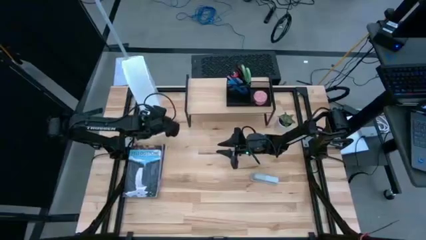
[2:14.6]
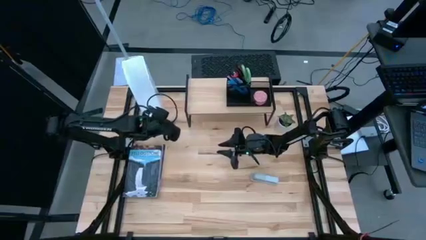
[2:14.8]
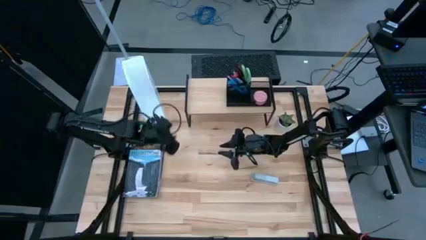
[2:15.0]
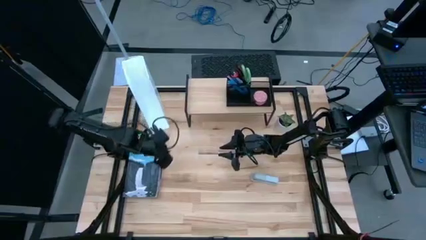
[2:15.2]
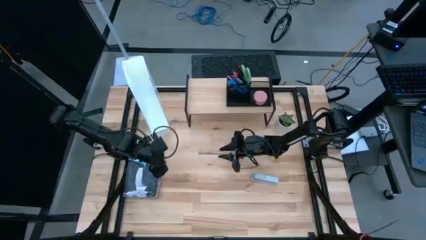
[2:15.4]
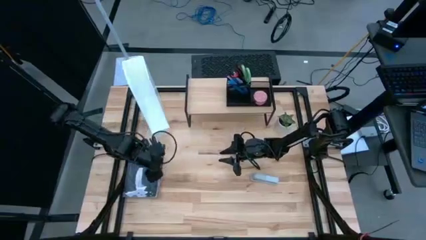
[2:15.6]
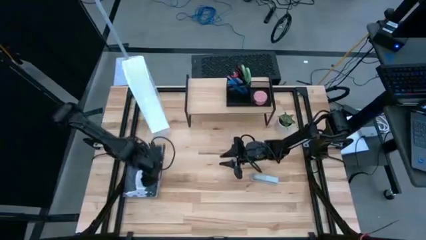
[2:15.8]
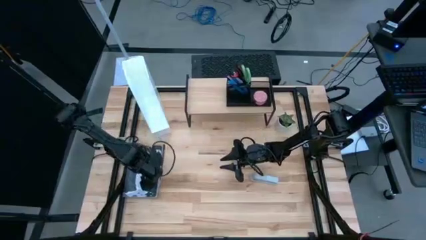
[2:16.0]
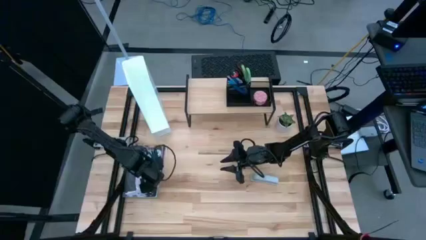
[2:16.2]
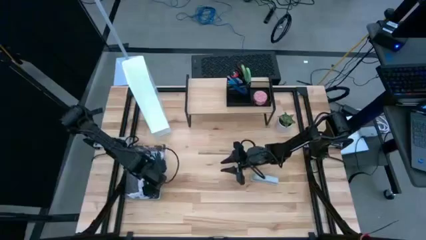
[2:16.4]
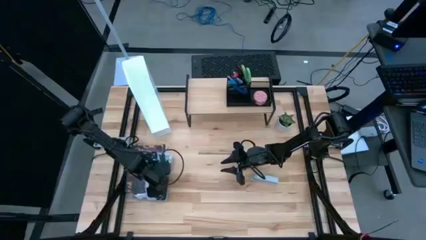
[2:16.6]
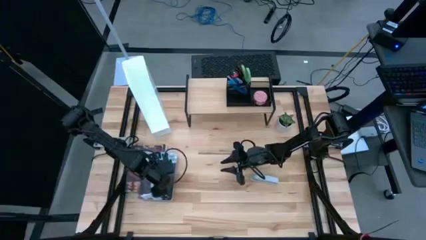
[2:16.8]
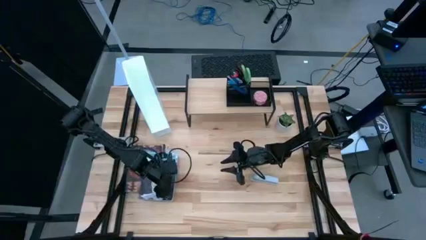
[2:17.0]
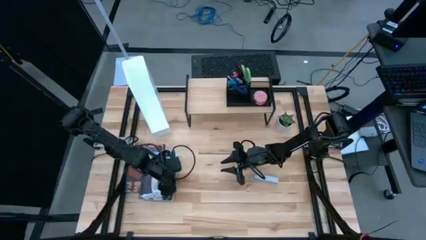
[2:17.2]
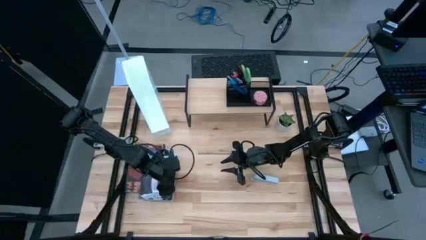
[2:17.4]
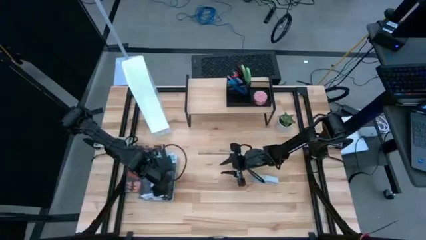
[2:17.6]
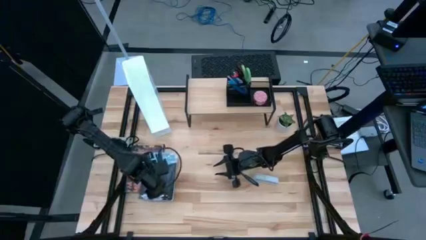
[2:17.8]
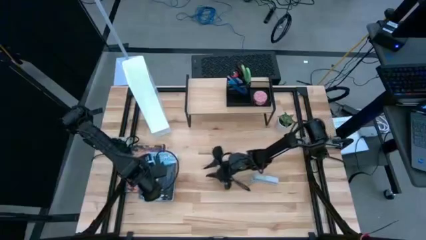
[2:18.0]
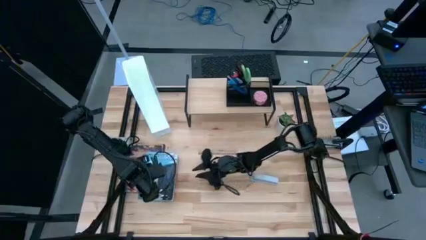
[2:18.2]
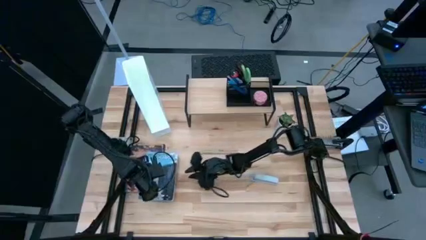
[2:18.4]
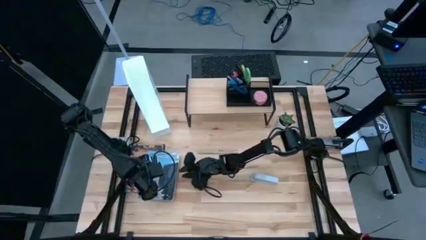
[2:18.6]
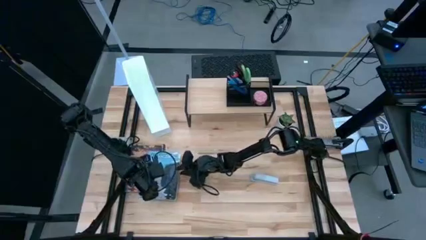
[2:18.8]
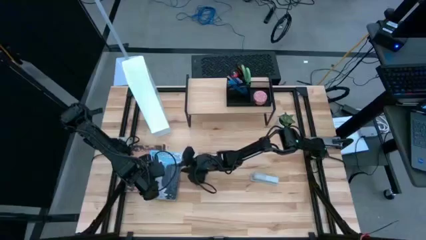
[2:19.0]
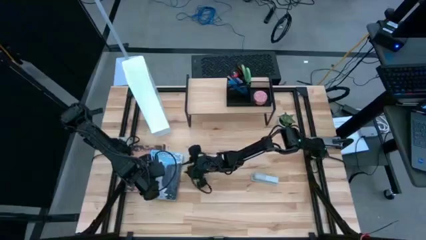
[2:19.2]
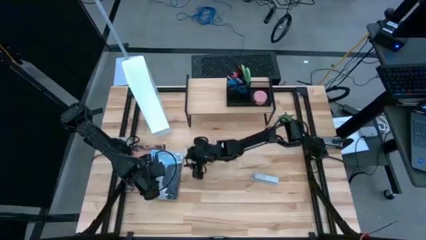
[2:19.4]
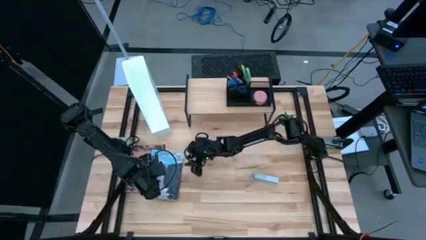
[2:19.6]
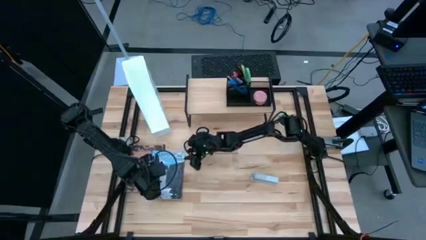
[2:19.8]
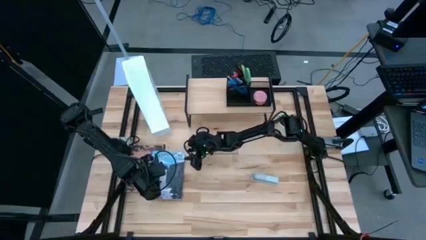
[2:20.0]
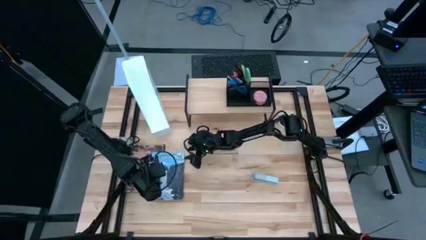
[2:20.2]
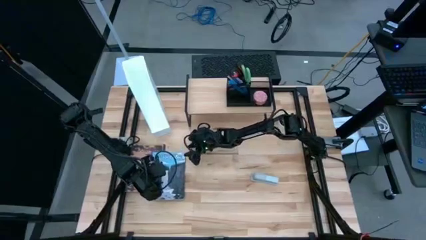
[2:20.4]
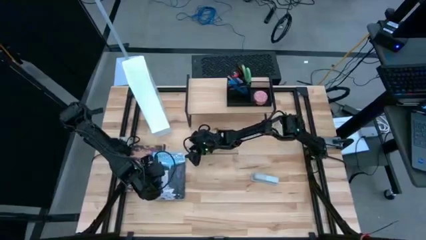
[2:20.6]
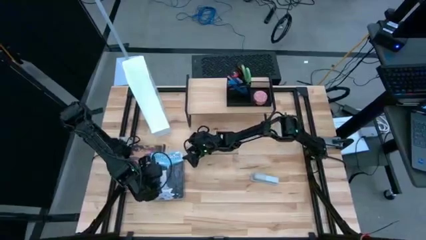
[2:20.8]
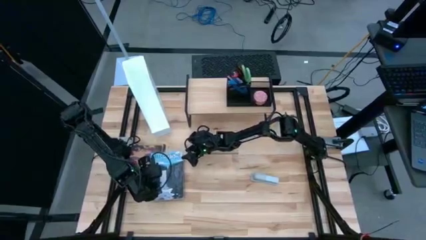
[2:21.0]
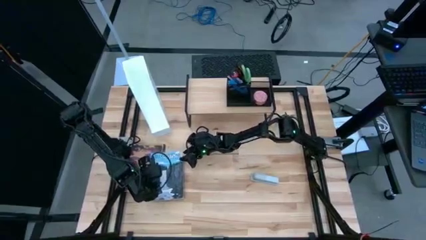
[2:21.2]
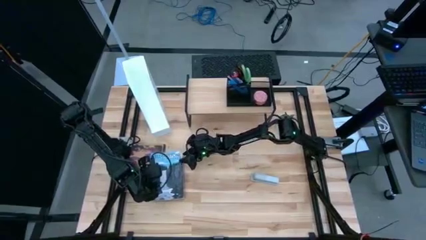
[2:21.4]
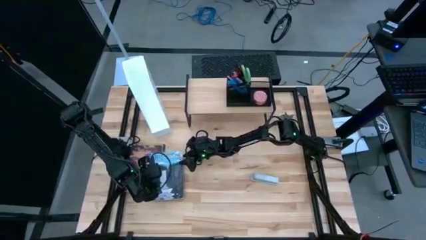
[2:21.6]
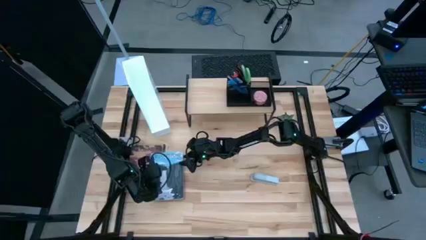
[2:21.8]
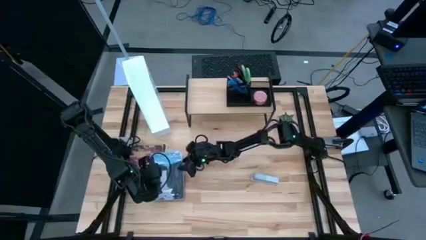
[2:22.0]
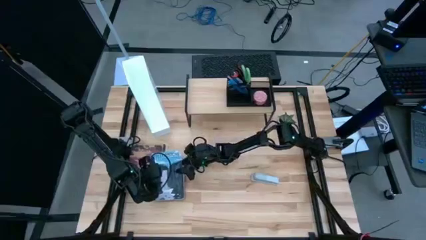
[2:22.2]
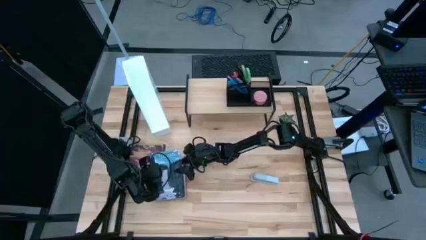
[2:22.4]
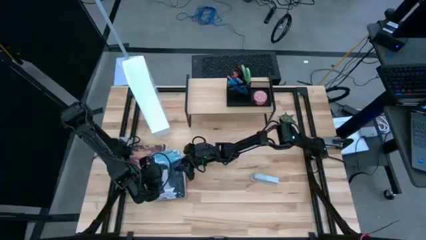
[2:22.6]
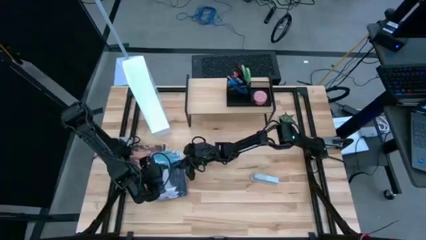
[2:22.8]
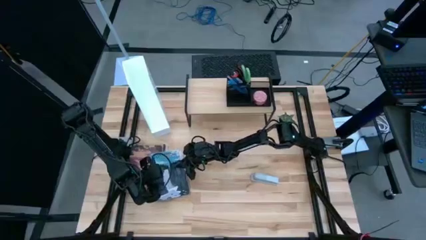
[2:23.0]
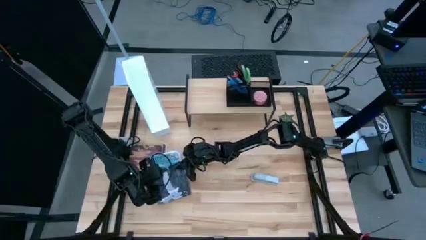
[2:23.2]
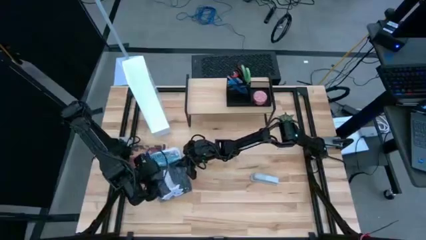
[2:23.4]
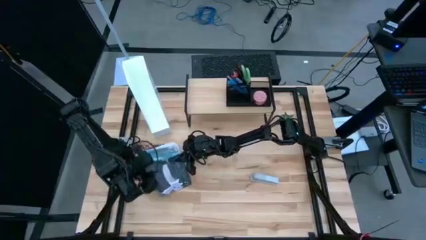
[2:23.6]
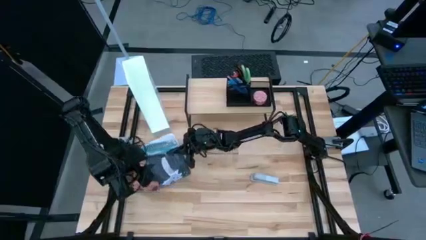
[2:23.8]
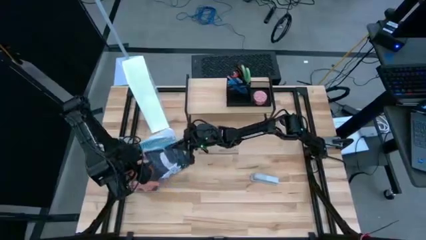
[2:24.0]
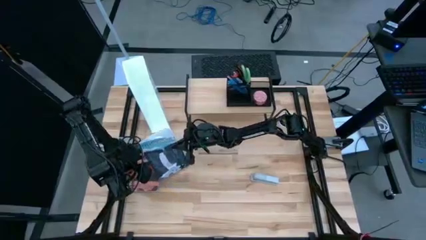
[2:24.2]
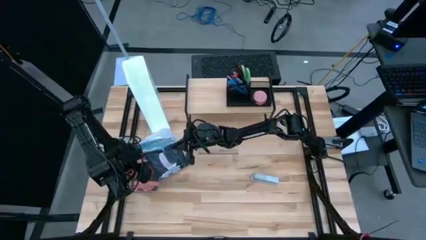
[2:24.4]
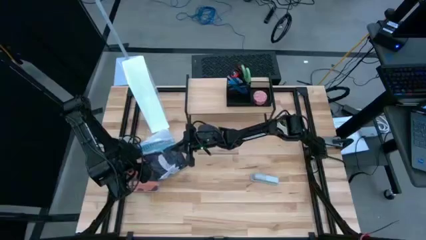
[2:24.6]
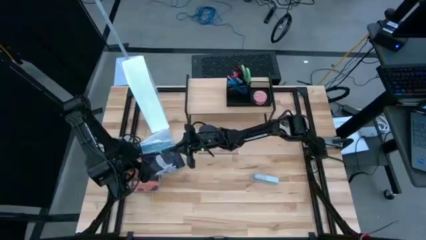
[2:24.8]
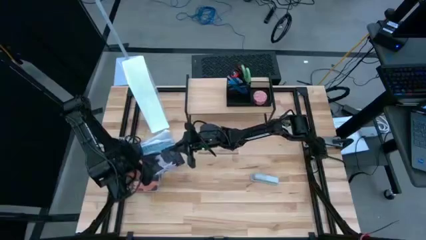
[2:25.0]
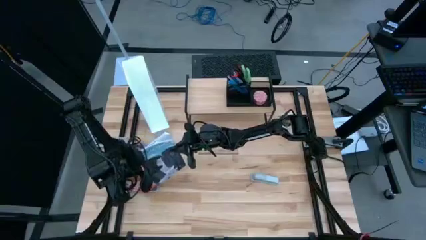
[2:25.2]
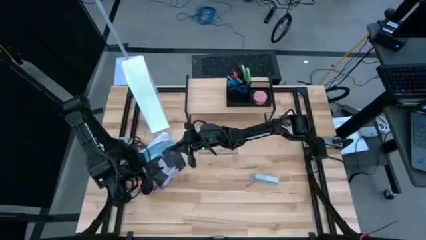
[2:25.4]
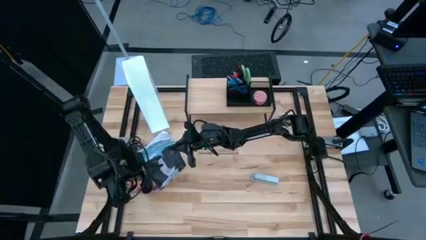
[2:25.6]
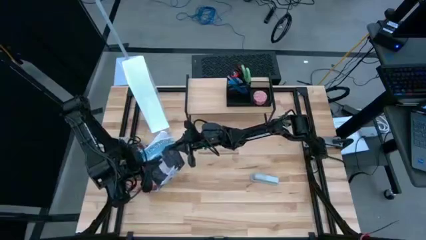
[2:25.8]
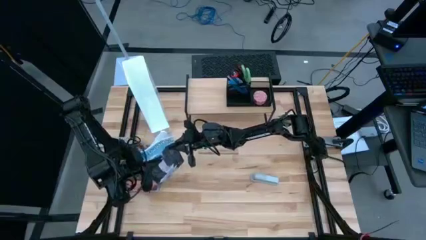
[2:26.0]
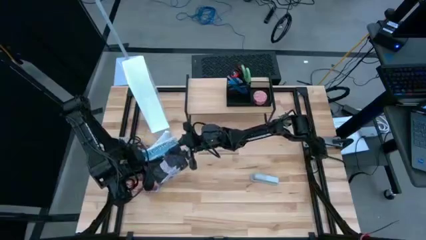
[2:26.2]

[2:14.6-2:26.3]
Task: Stock shelves
Put the blue book into the white bookshelf

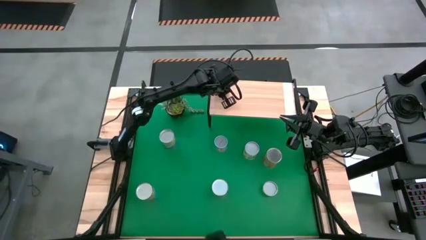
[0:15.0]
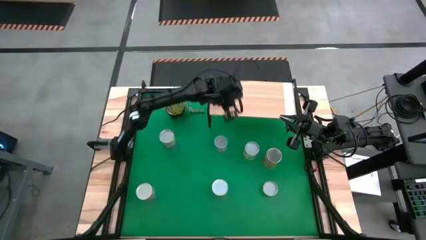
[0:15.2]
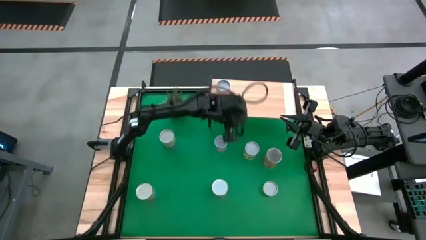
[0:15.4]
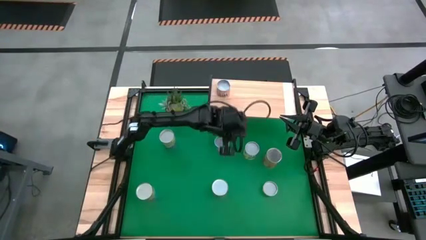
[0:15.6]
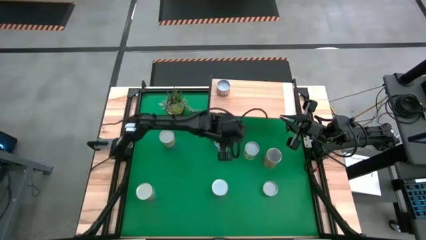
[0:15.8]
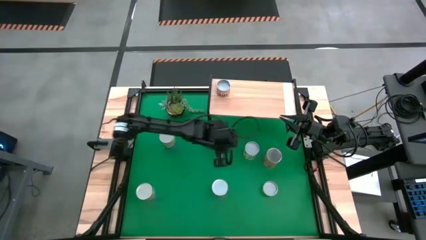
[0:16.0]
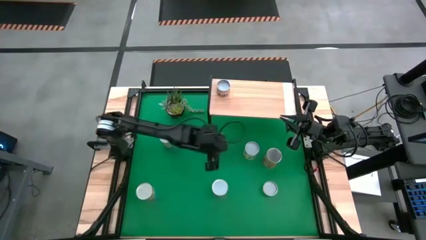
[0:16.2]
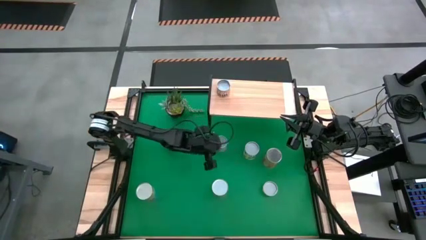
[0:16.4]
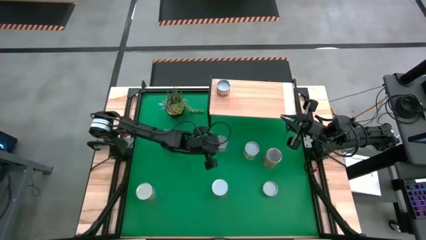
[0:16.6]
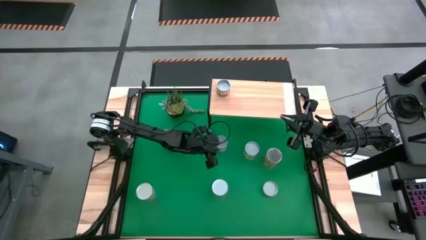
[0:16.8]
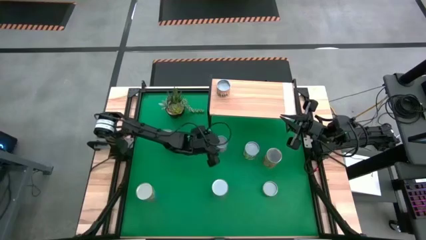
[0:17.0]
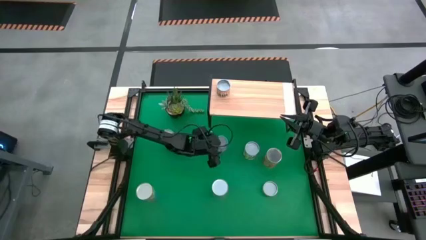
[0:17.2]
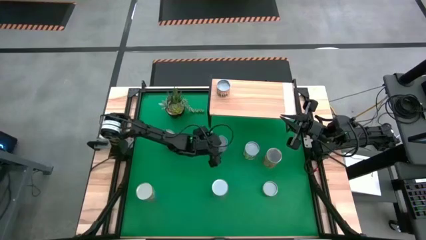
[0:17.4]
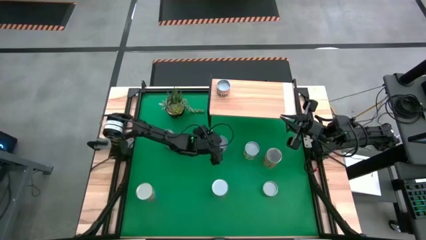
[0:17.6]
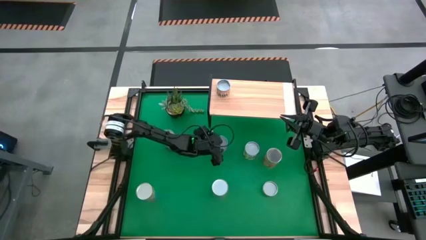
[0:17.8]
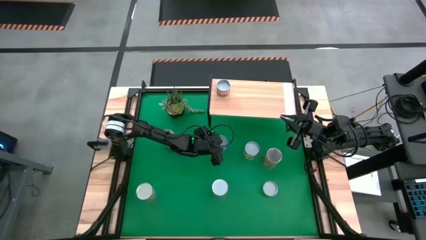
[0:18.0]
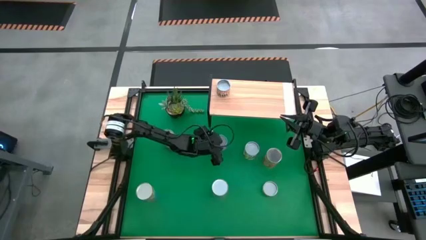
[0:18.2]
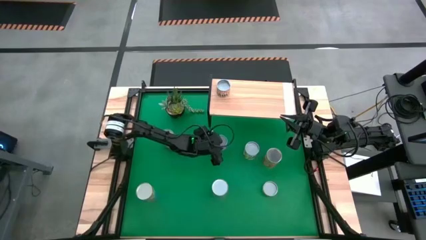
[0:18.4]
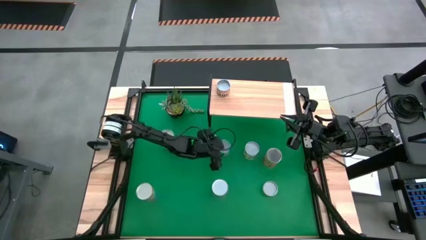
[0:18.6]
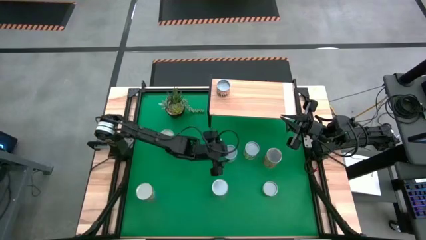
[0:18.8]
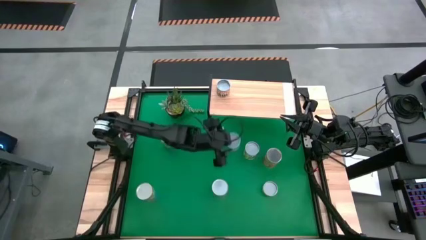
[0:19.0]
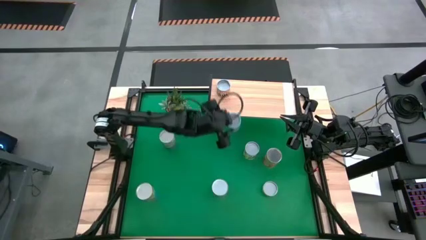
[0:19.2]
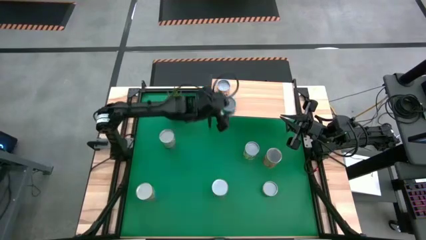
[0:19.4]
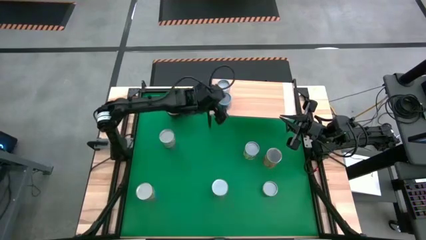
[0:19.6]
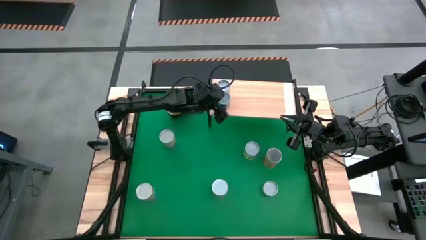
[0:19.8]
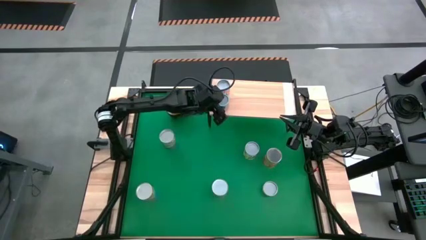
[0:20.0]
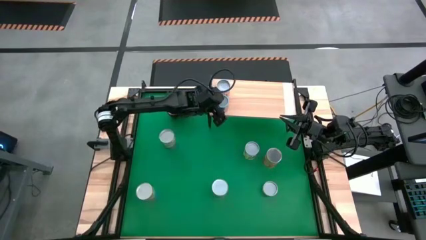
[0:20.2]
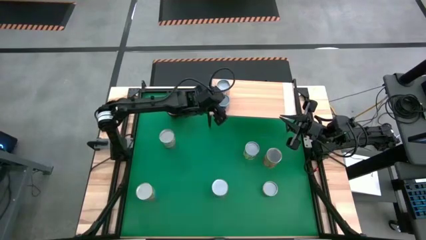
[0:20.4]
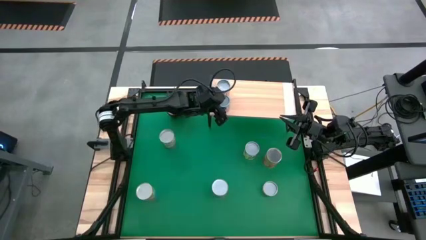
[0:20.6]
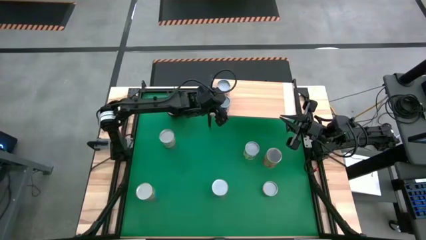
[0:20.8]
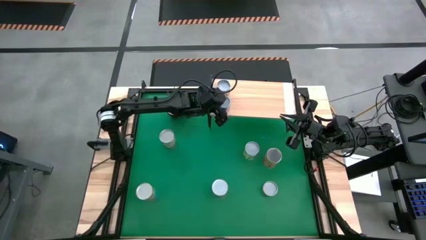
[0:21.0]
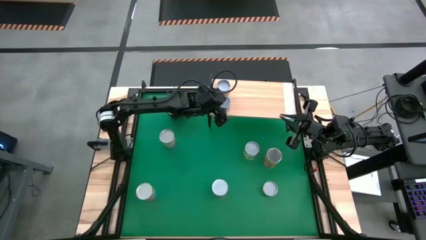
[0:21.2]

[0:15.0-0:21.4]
Task: Pick and place cans onto a shelf
Put the canned corn on the shelf
